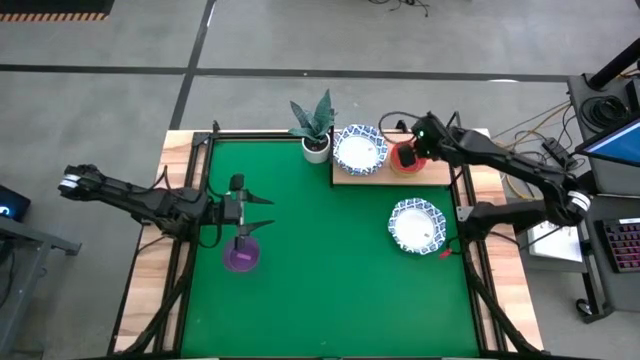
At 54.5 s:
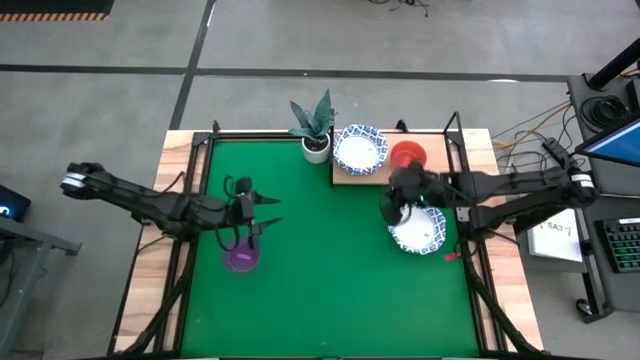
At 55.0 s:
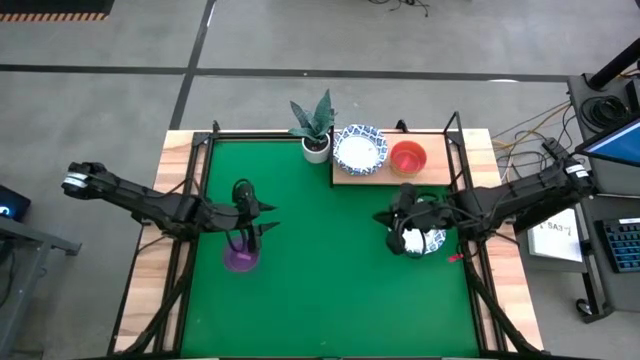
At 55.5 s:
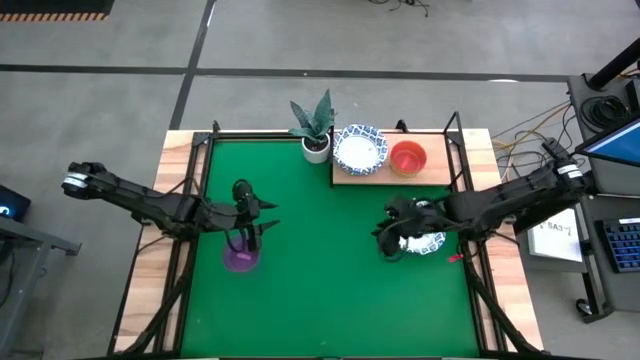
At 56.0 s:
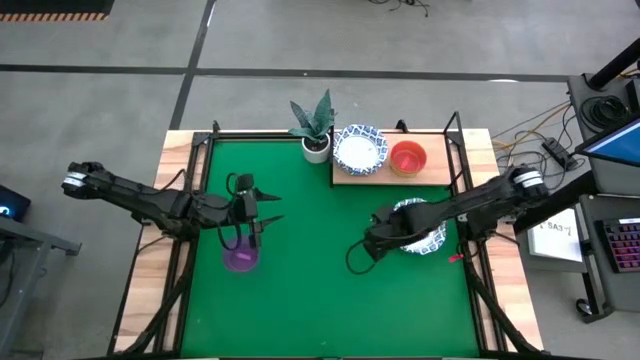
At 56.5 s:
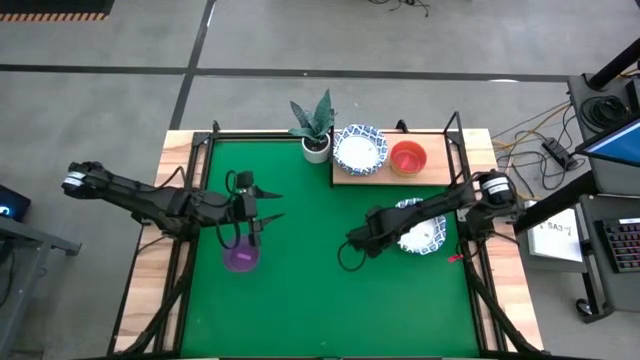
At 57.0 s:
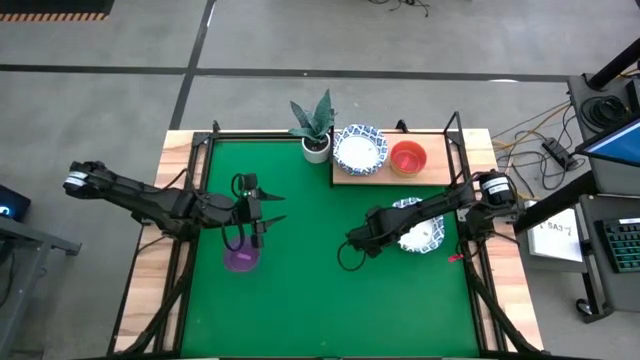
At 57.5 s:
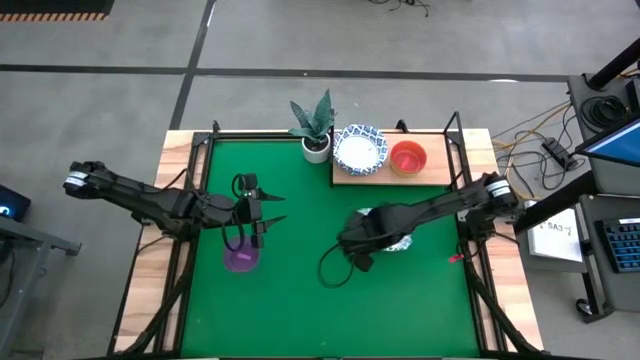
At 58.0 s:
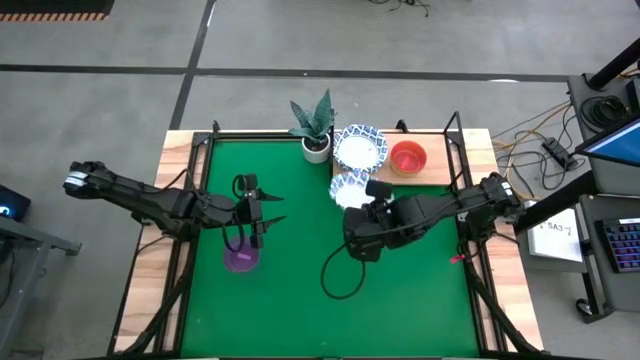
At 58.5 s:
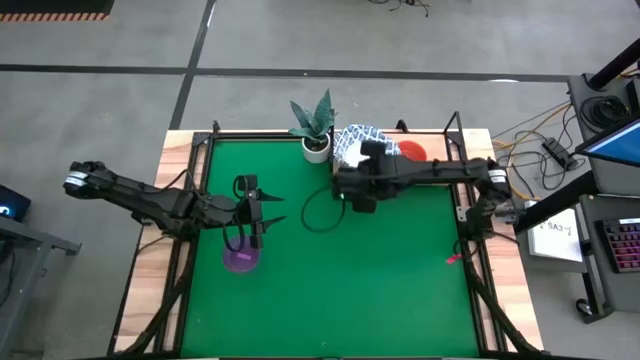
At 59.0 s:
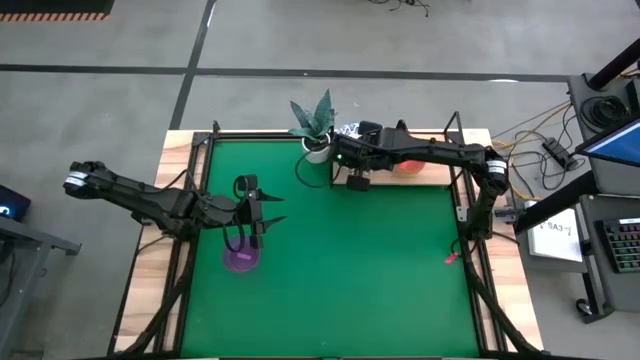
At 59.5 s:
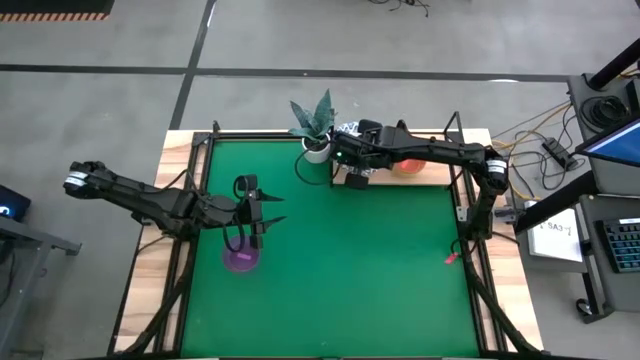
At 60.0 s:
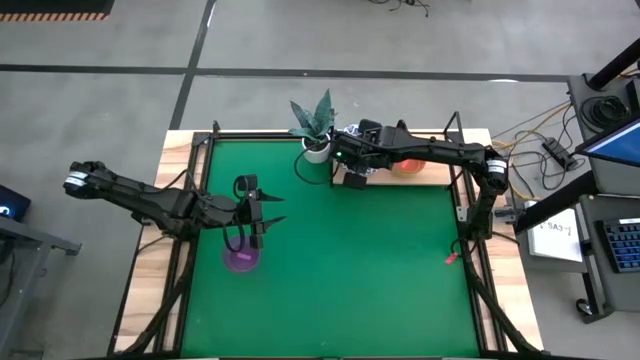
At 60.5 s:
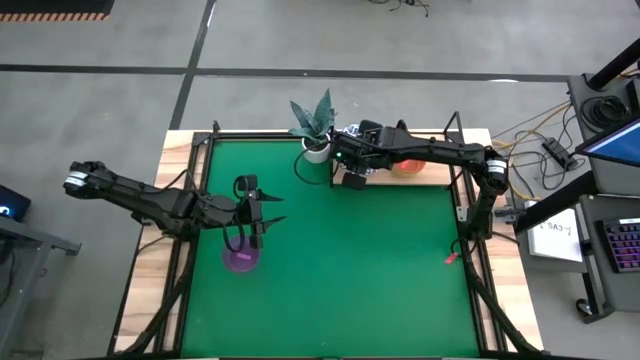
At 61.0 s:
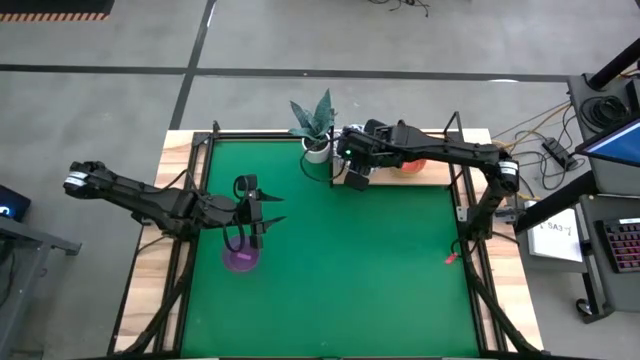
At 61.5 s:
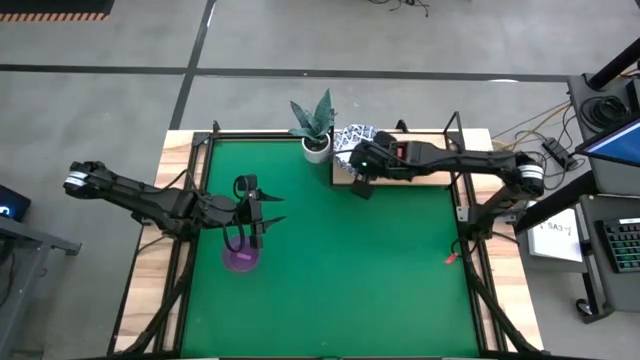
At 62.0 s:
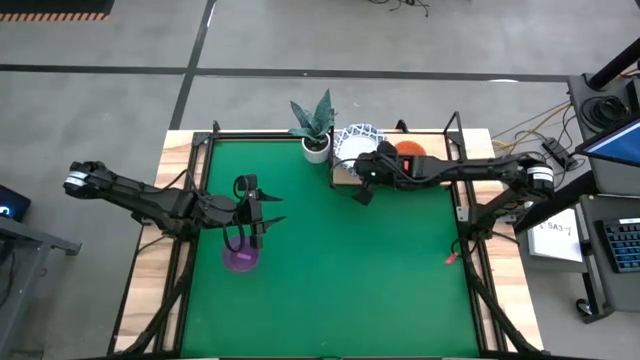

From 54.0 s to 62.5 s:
Task: Place and stack bowls onto a shelf
Stack the white and blue bowl on top of the white and blue bowl

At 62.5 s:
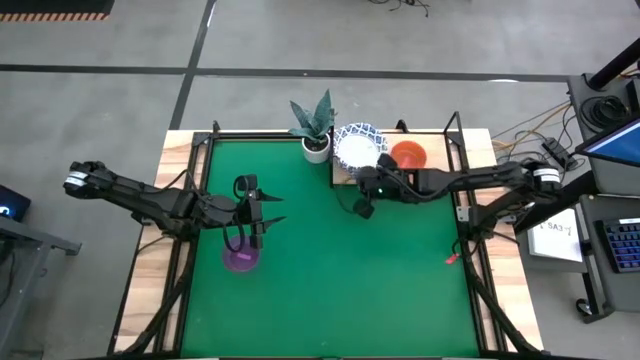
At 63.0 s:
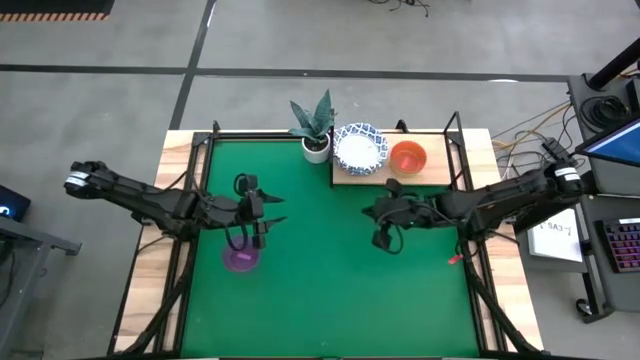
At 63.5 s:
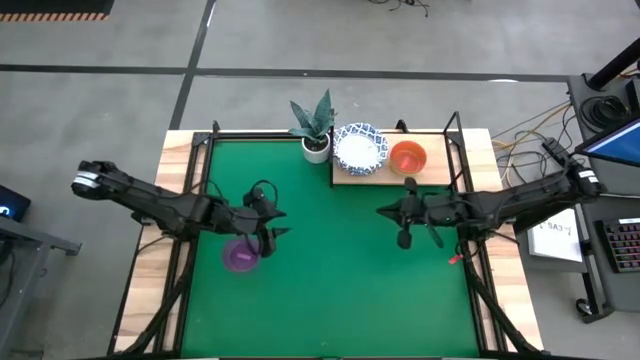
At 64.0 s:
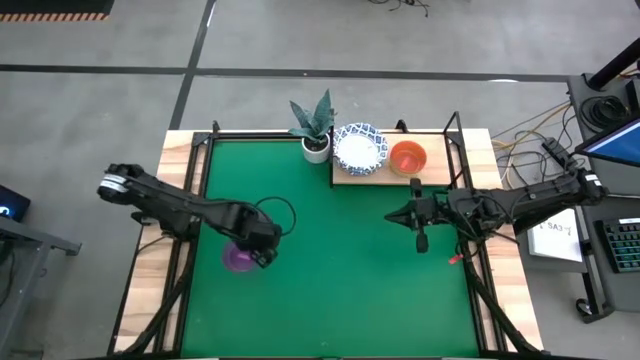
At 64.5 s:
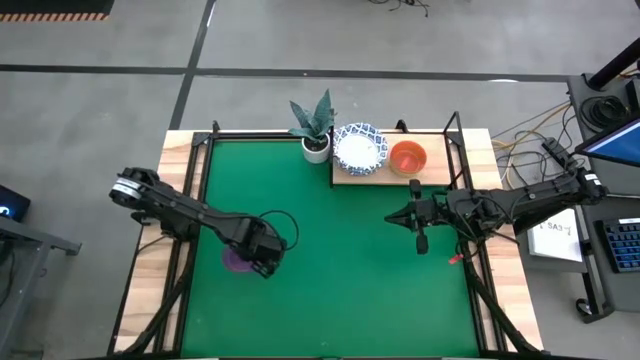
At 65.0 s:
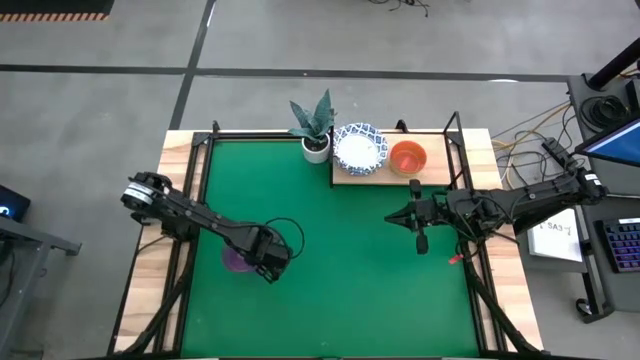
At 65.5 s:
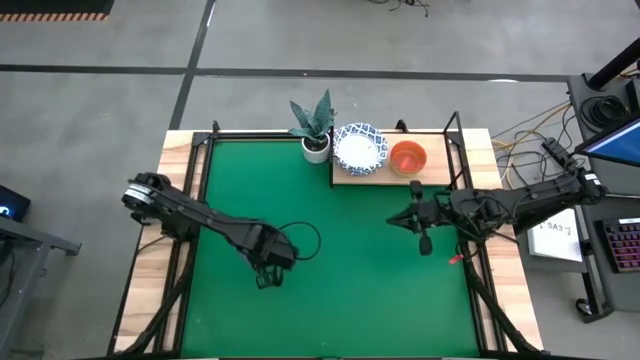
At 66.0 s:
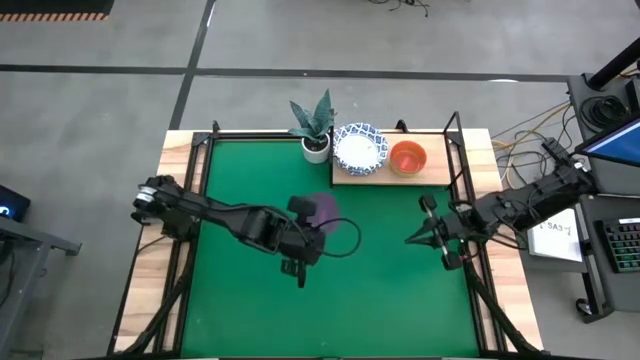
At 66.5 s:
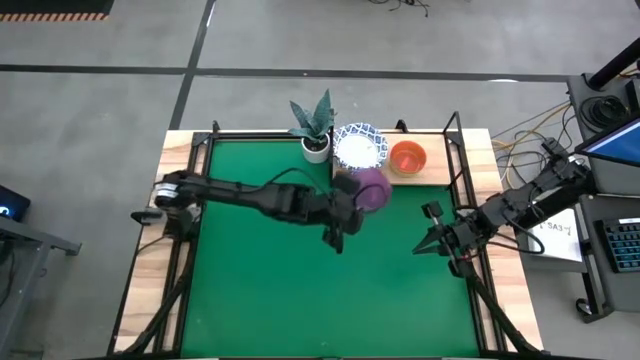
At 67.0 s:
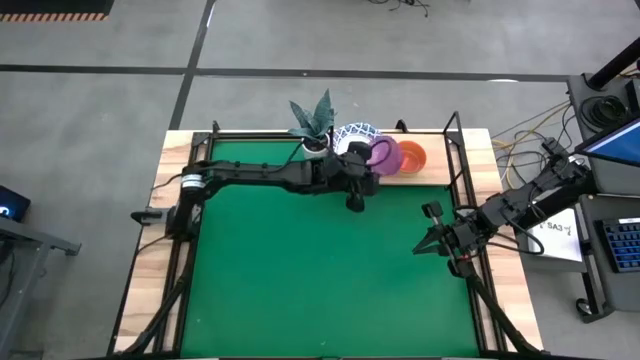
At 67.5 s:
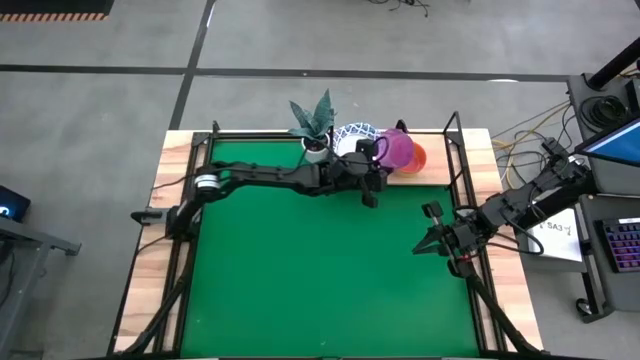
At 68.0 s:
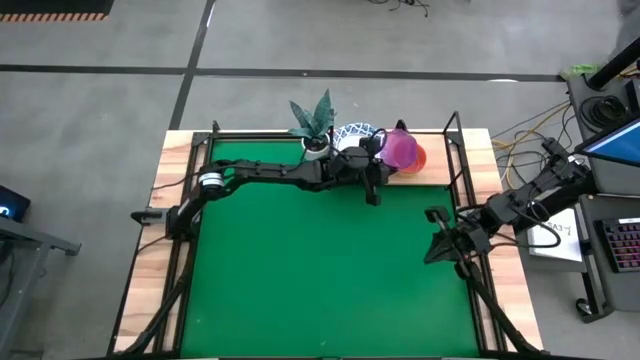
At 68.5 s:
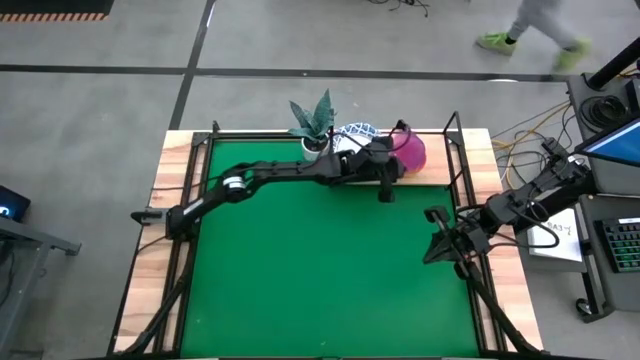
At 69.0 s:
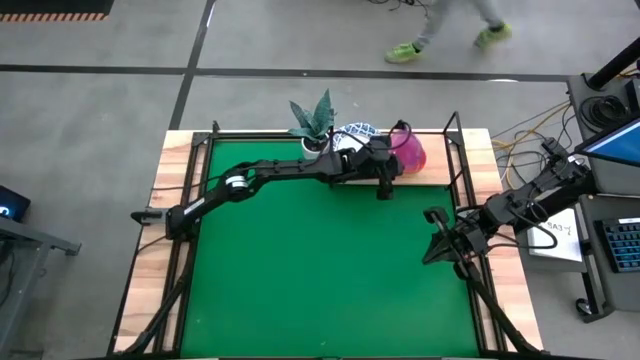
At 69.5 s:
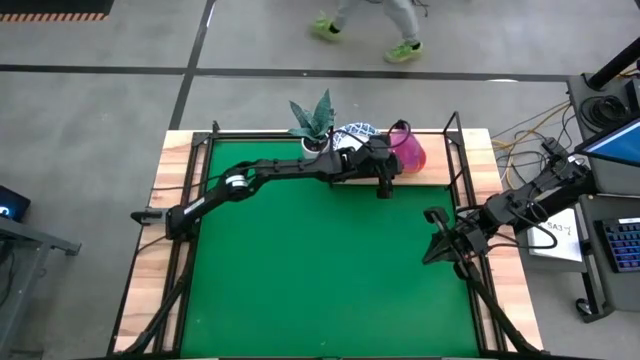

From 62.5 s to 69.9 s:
Stack the purple bowl on top of the orange bowl

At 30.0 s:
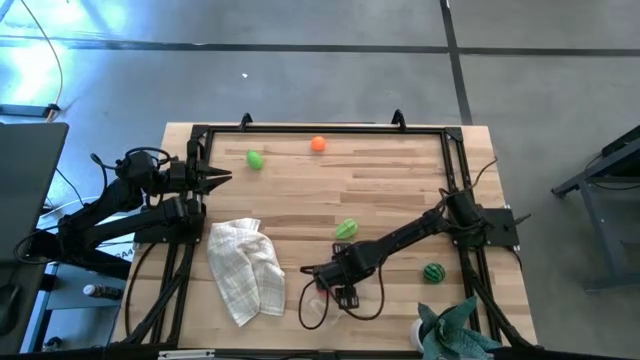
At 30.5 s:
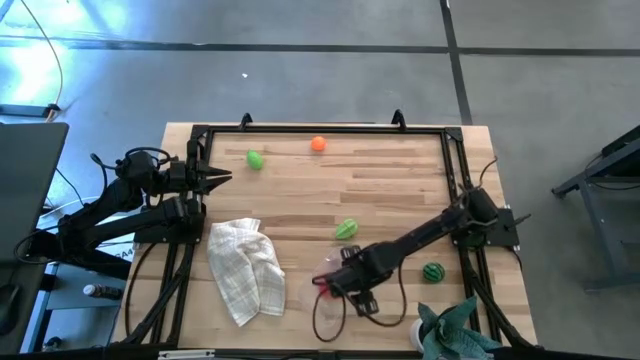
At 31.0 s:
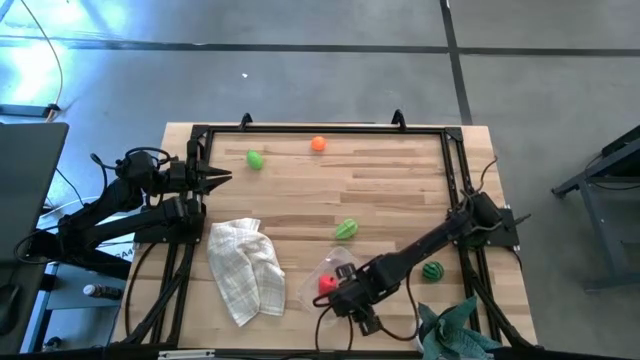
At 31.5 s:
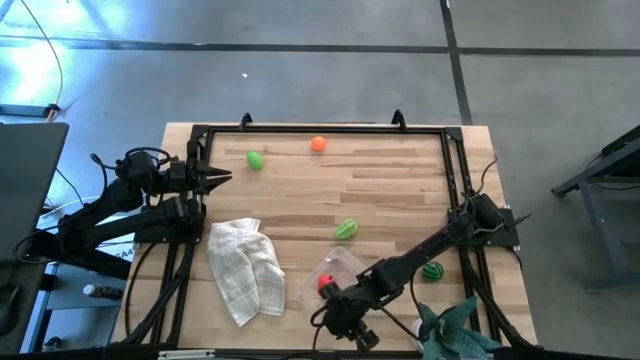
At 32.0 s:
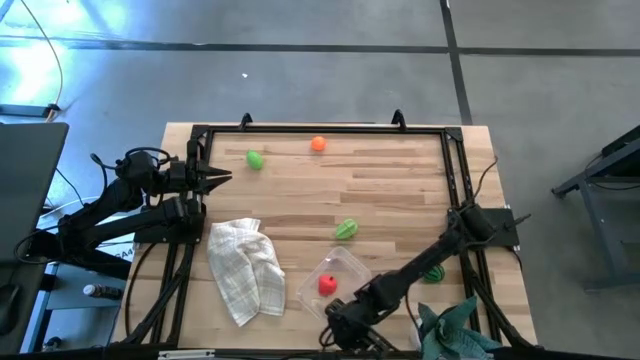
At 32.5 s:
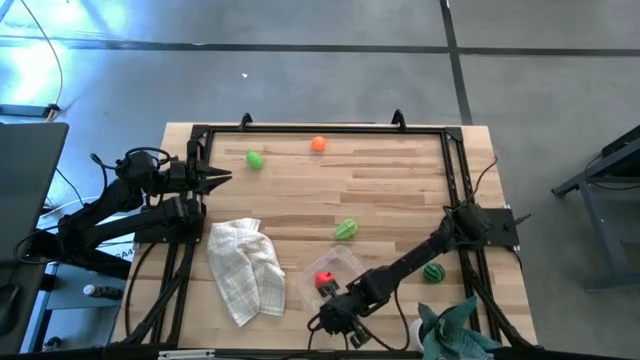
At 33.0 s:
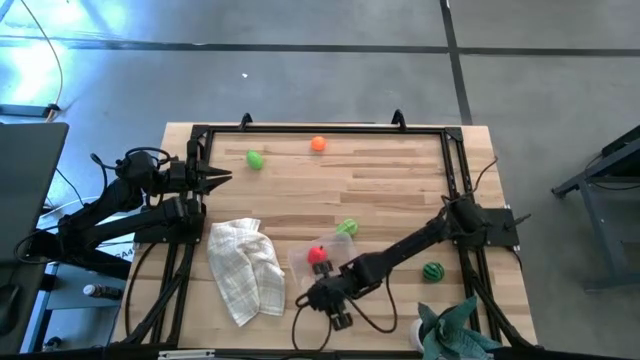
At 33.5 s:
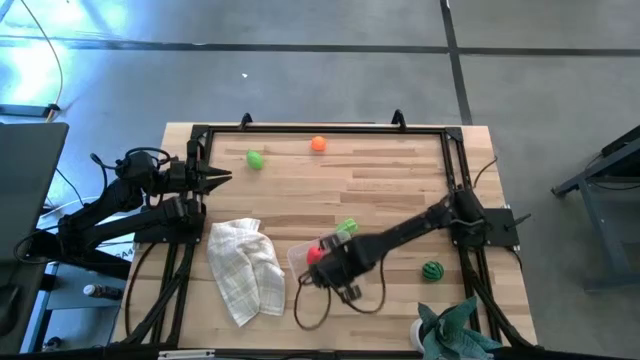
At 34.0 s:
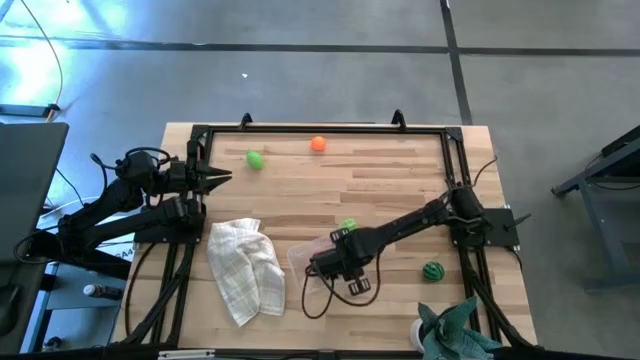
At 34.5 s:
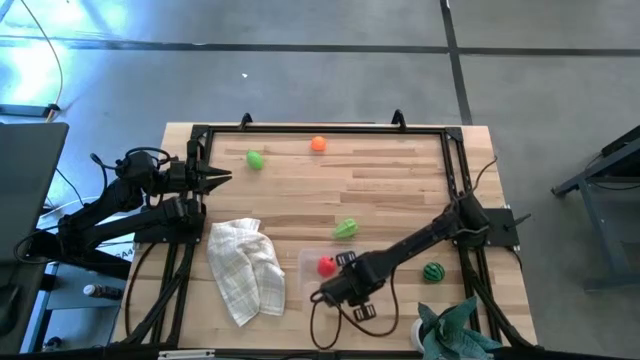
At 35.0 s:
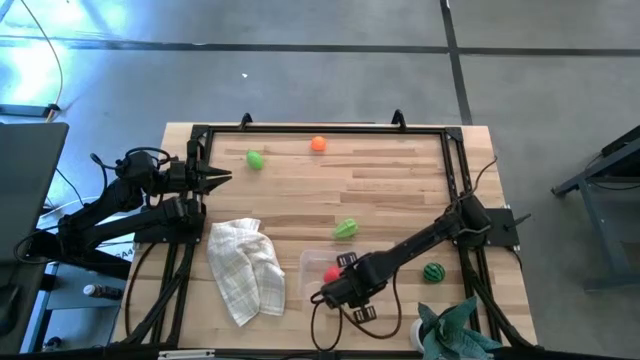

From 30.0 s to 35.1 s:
Task: Pick and placing Produce into tupperware
Adjust the transparent bin
